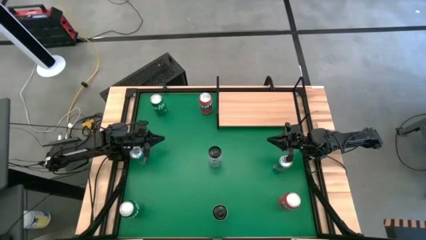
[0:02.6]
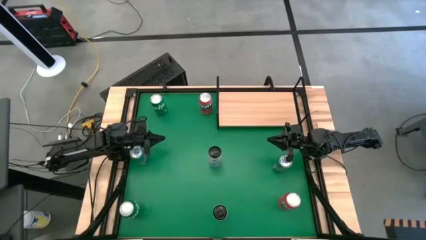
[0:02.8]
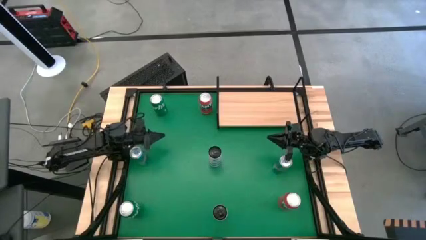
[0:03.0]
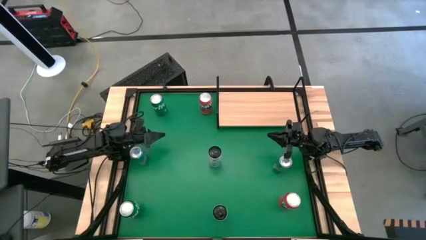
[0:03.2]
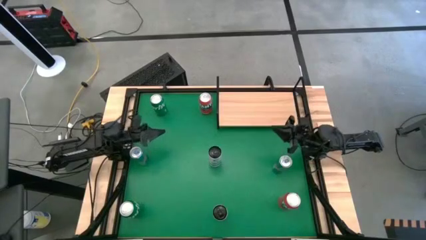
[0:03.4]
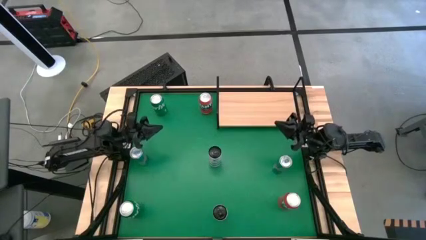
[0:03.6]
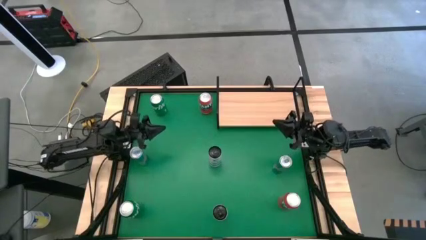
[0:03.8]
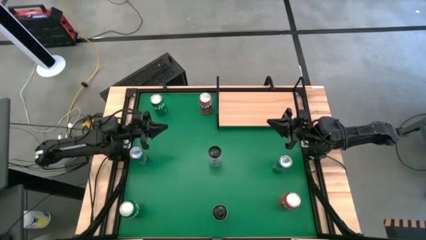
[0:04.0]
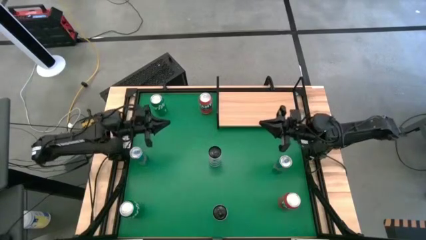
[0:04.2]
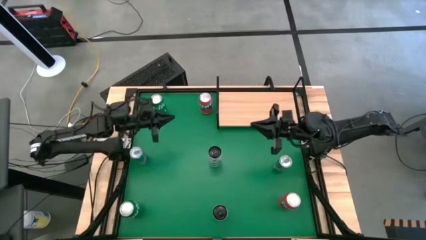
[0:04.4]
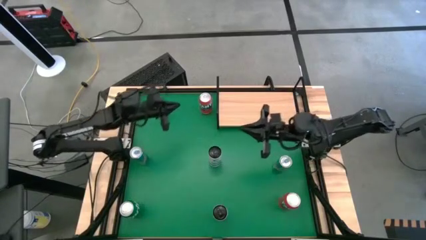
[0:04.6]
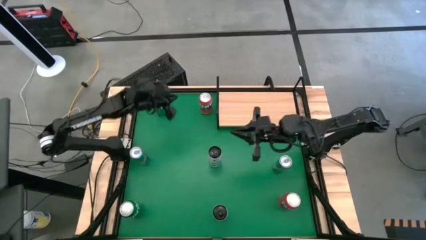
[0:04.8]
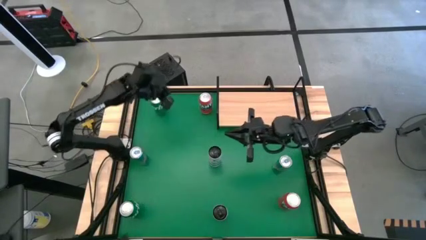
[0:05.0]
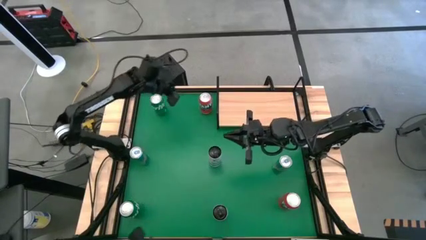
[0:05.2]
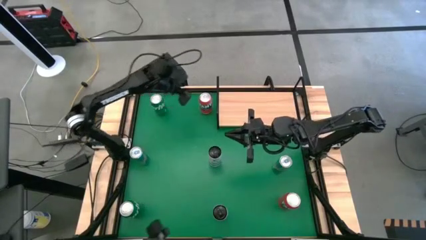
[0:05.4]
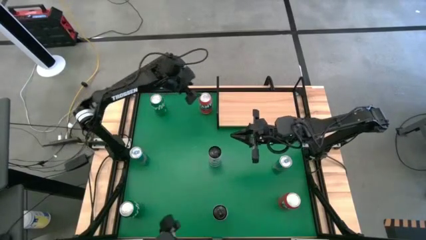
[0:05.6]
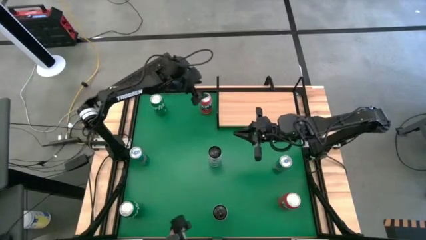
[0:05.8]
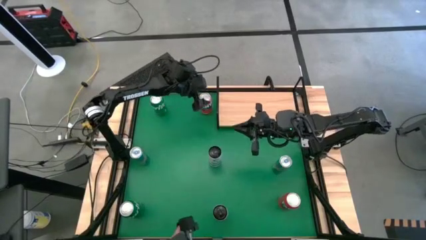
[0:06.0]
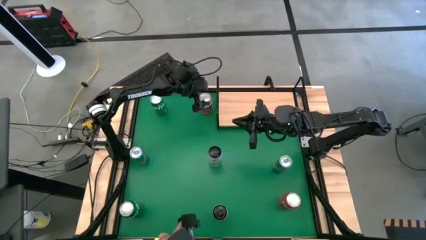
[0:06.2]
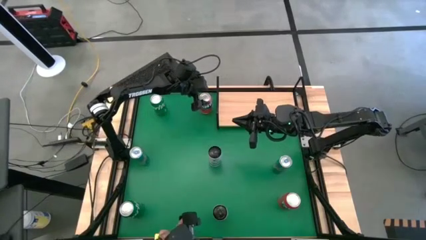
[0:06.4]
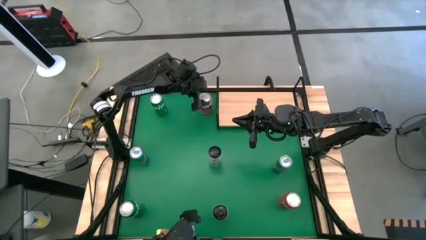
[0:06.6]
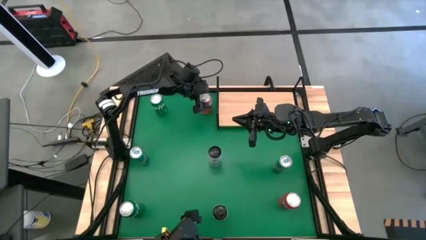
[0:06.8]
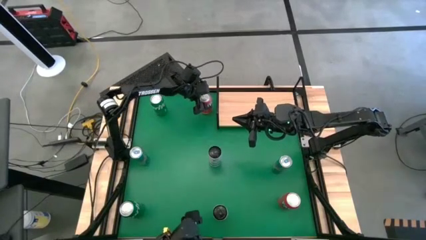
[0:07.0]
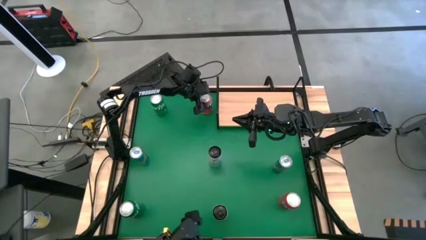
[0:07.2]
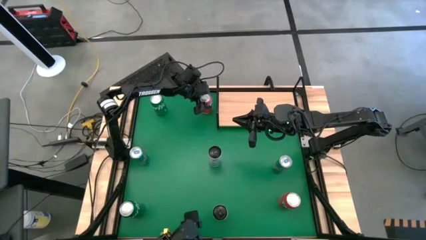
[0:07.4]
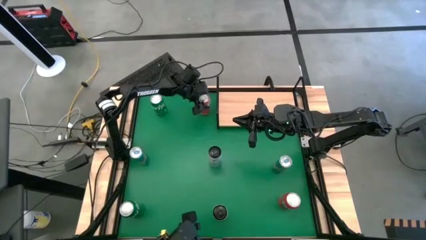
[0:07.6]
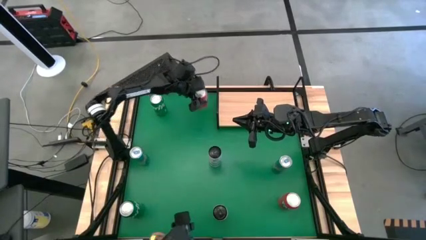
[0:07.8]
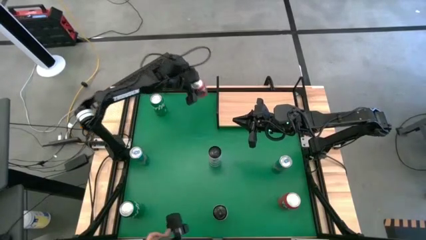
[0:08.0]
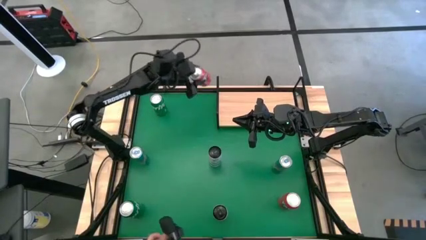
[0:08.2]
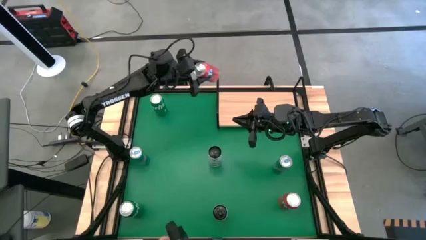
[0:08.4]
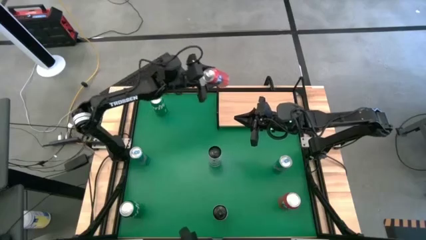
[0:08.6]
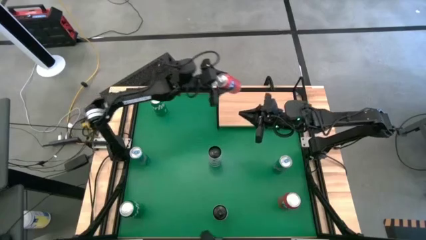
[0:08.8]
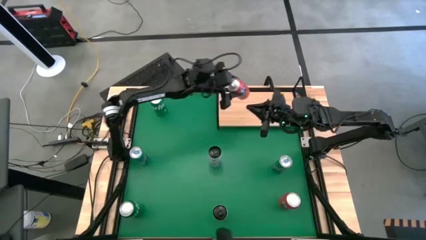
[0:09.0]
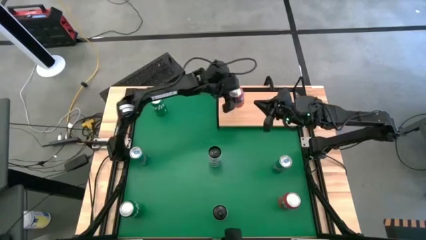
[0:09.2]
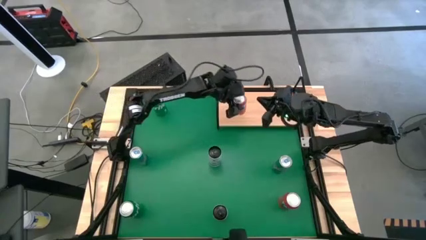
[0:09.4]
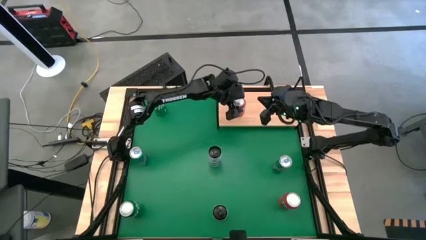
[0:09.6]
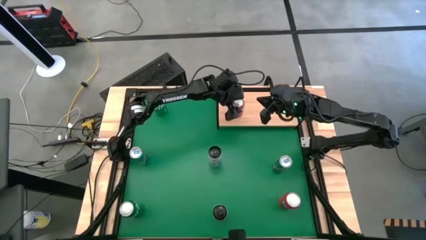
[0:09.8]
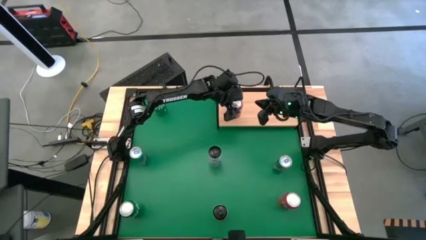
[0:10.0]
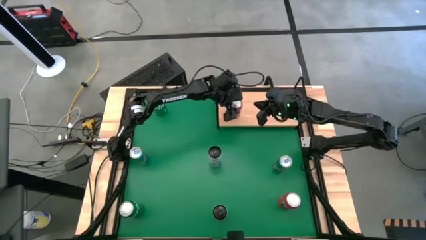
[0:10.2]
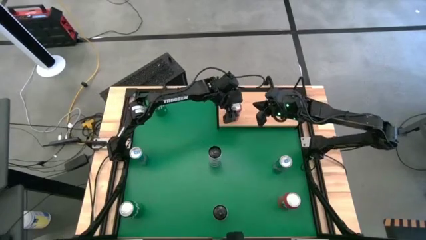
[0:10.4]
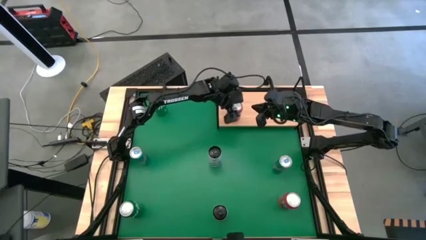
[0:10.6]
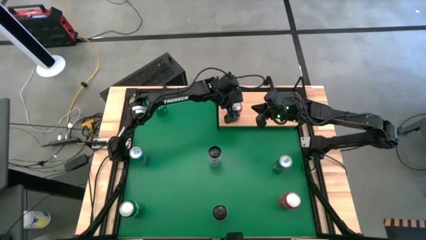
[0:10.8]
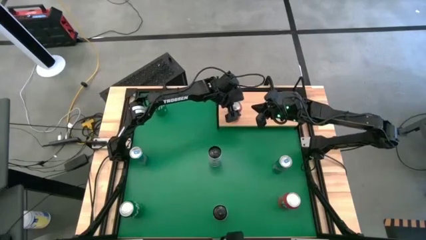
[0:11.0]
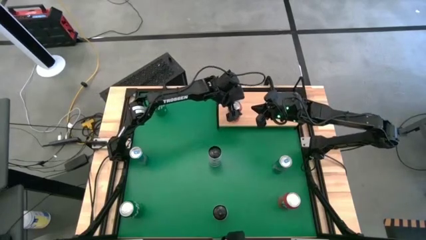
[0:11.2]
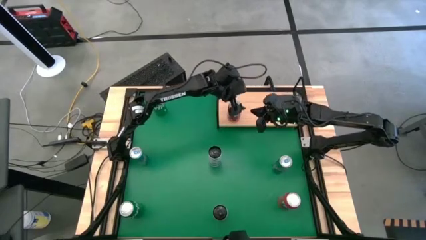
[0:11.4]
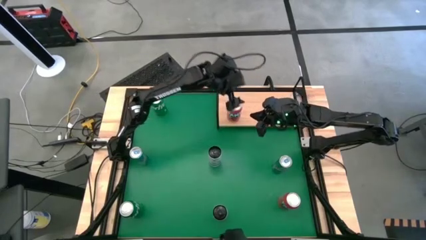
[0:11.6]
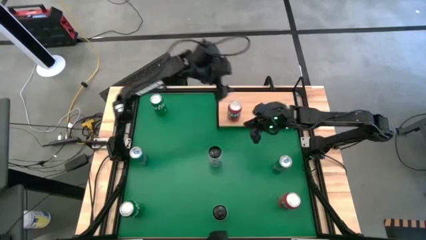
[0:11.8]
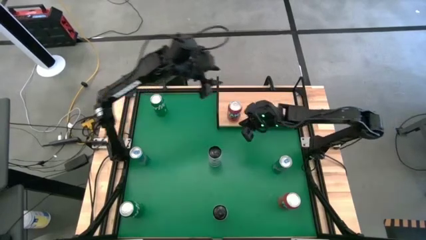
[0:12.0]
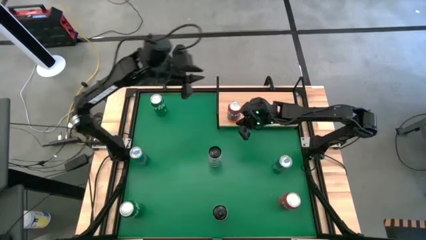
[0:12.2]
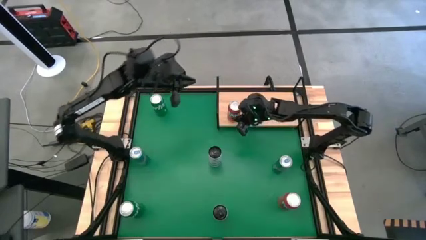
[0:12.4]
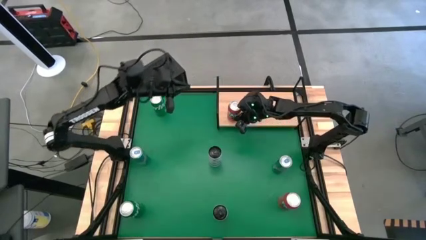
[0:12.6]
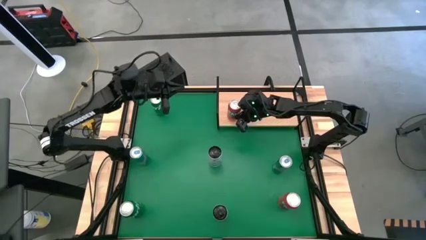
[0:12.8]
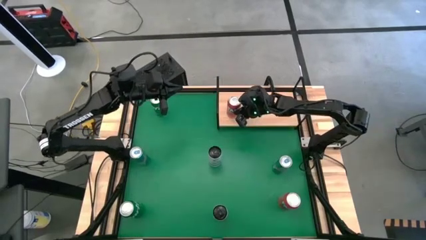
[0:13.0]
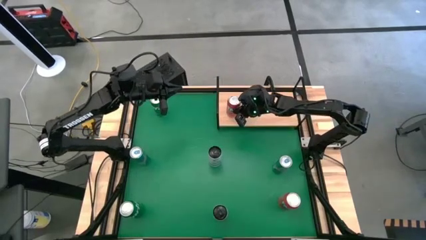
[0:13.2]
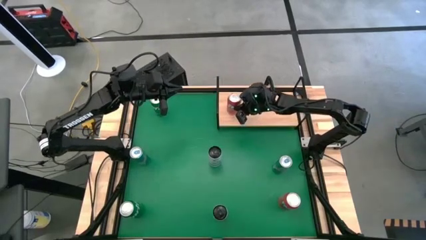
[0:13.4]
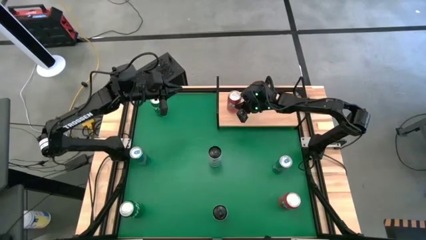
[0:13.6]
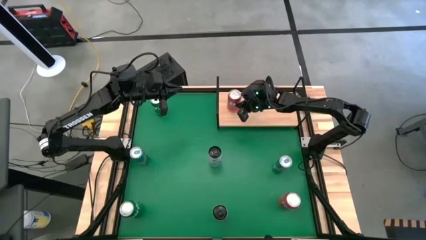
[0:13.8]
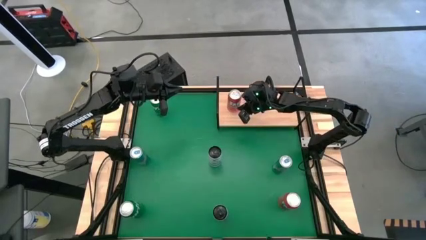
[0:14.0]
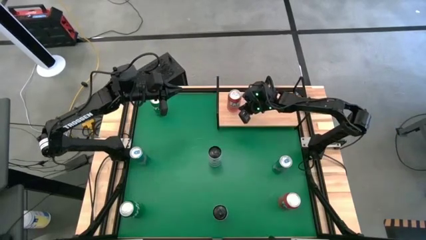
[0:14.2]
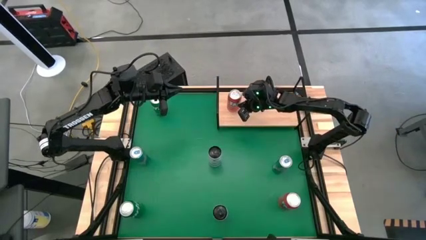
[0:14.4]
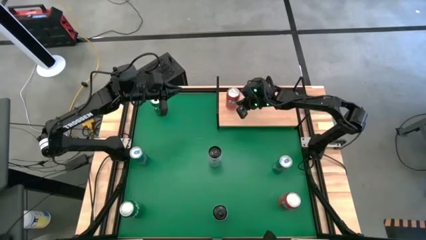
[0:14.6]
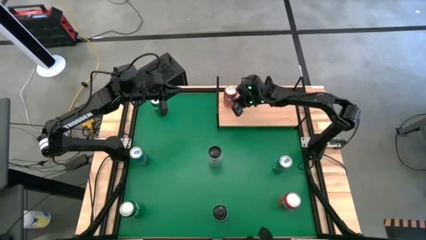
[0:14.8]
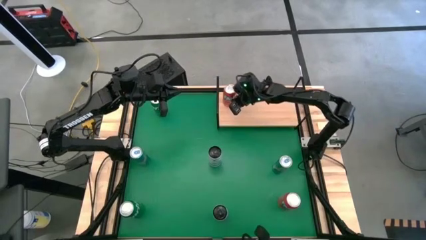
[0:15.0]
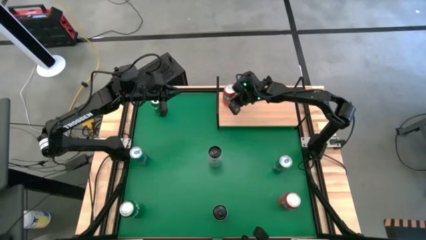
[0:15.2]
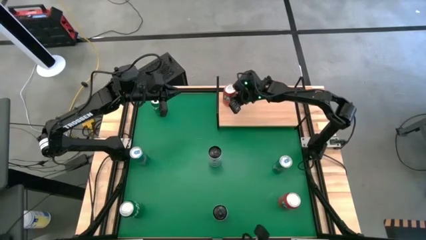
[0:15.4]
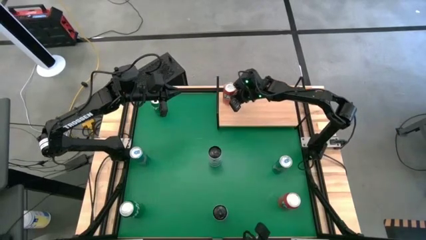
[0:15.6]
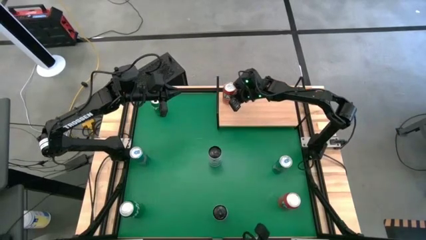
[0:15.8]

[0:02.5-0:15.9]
Task: Place canned beverage on shelf
Put the top orange soda can on the shelf

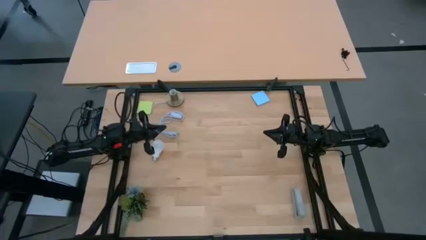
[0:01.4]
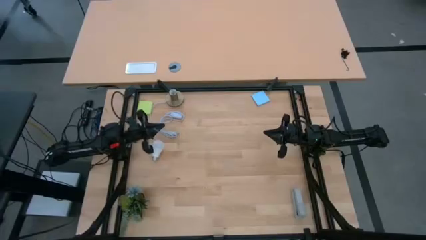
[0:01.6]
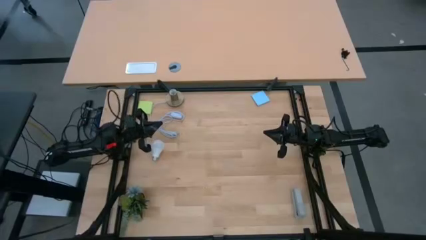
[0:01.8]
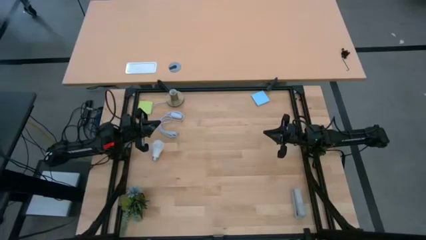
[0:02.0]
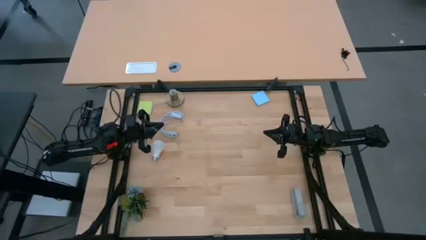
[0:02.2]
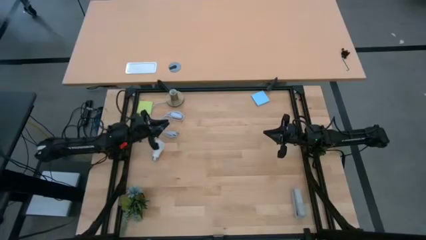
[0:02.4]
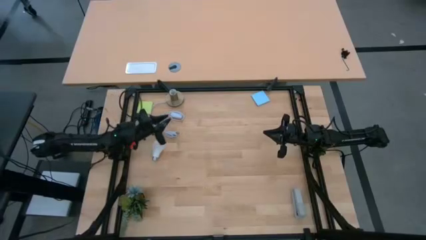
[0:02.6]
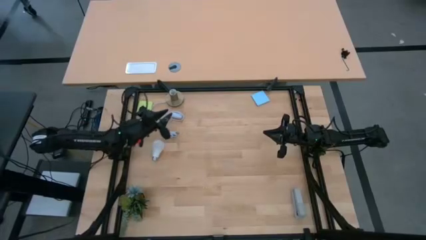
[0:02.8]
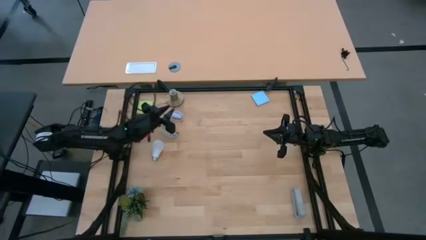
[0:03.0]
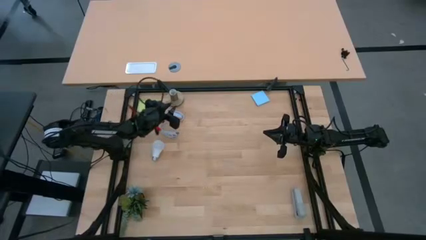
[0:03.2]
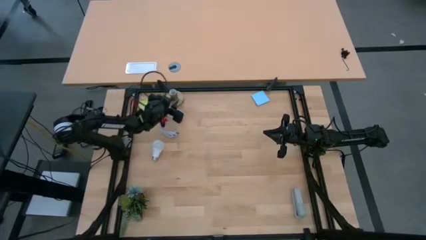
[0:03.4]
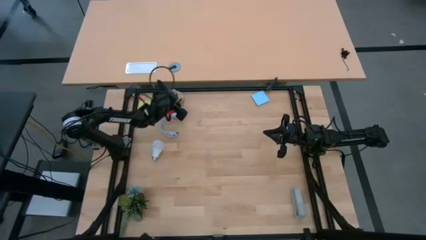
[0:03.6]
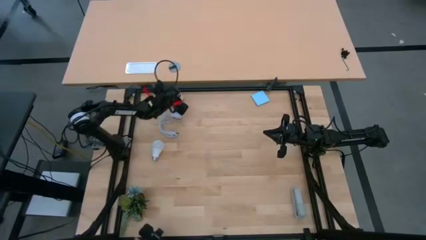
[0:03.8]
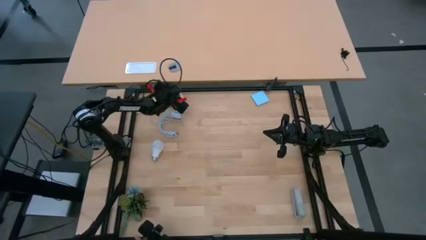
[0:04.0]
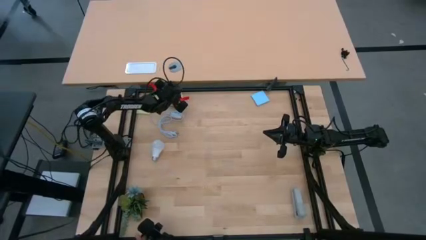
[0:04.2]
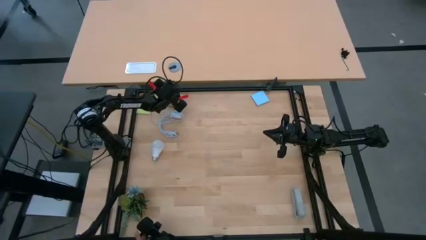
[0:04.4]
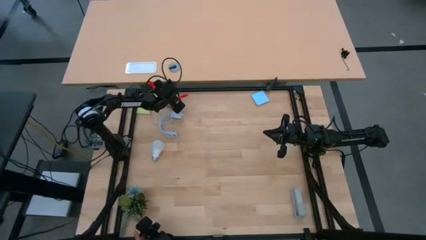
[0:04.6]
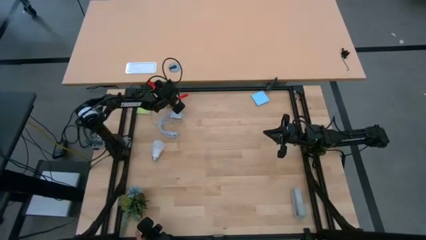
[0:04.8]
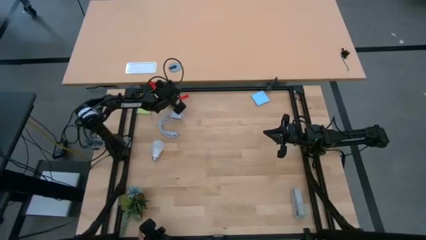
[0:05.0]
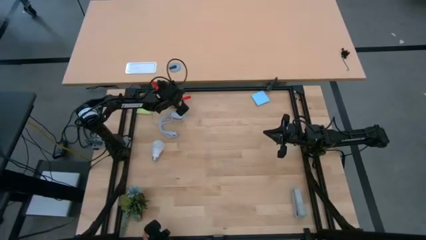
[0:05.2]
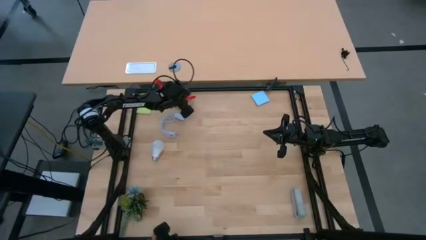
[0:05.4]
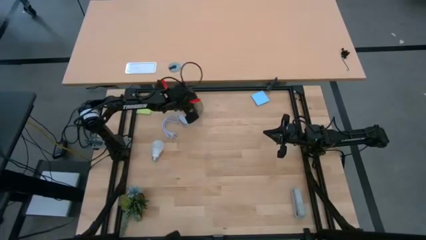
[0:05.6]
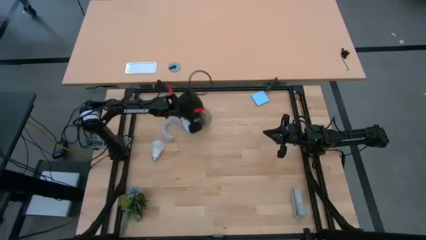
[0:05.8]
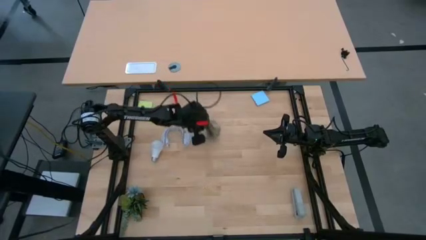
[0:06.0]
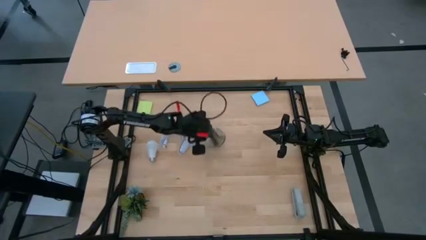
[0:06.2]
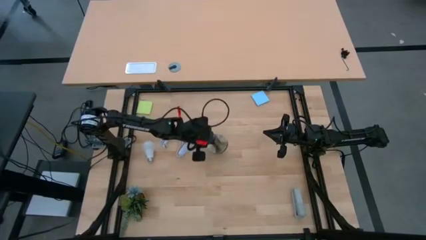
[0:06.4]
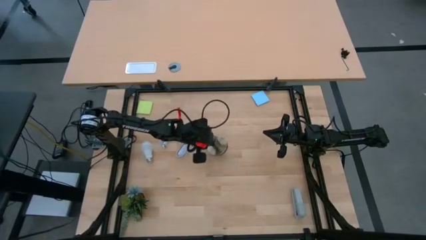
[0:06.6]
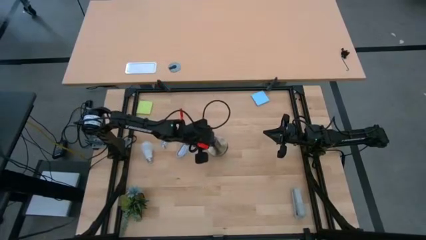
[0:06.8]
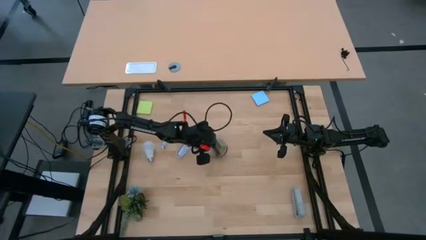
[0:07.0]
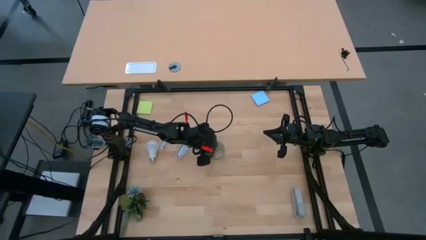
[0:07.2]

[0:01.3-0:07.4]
Task: Screw lightbulb
Move the lamp to the center of the table
